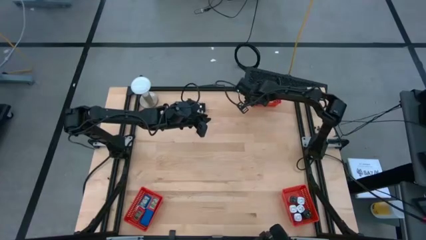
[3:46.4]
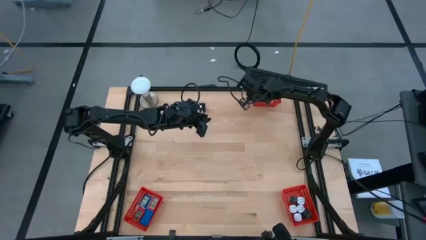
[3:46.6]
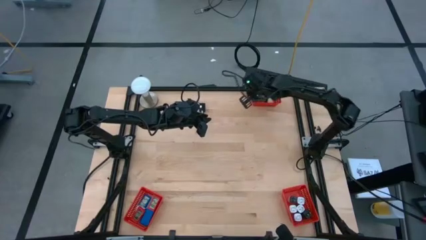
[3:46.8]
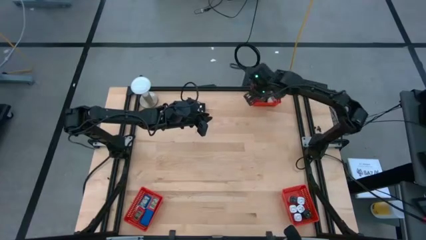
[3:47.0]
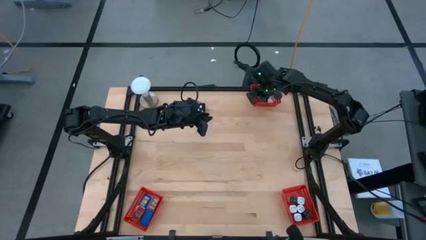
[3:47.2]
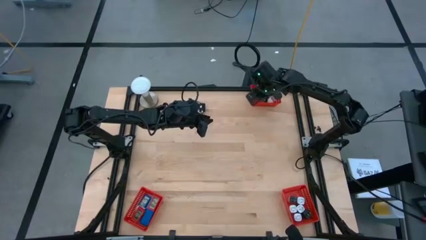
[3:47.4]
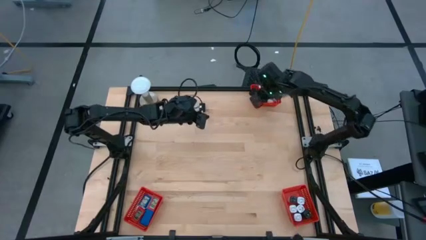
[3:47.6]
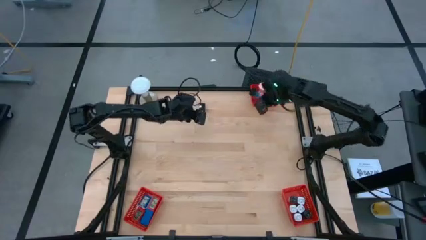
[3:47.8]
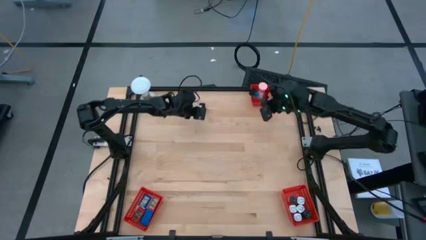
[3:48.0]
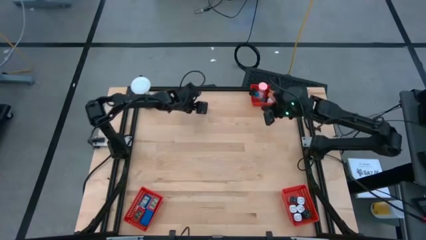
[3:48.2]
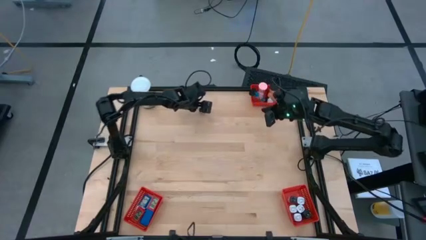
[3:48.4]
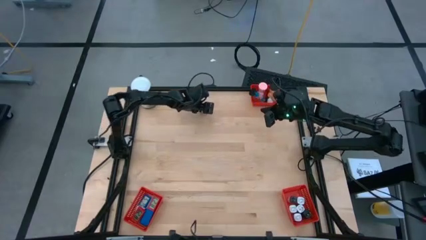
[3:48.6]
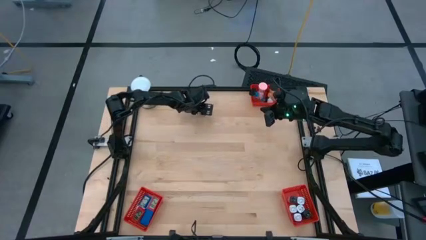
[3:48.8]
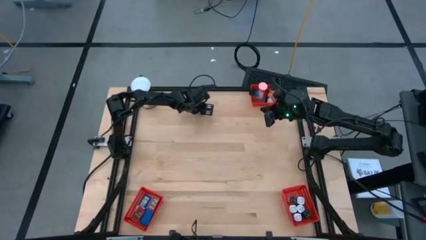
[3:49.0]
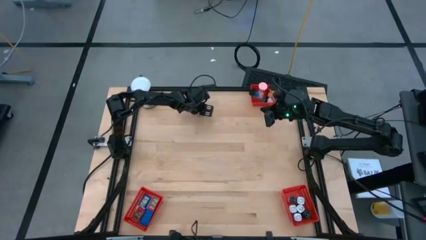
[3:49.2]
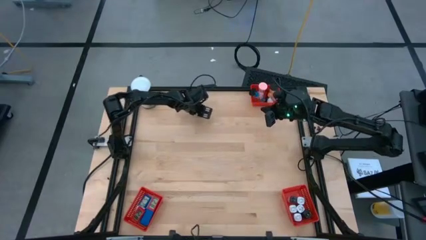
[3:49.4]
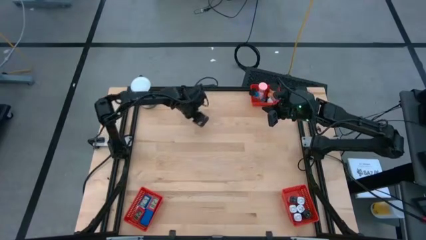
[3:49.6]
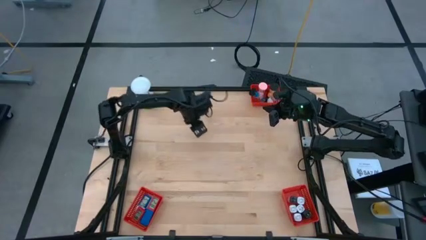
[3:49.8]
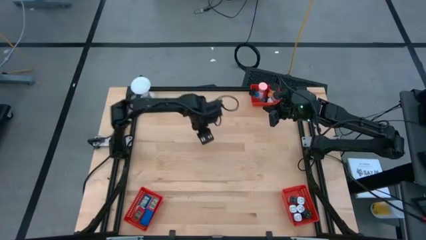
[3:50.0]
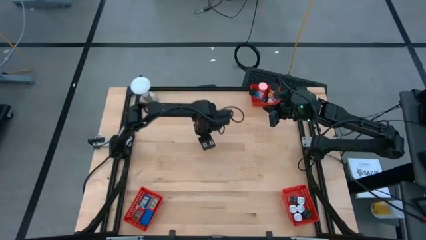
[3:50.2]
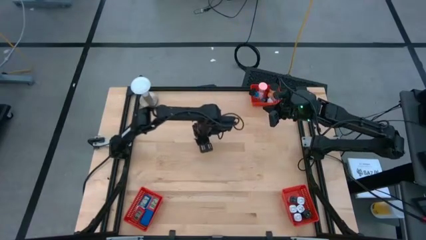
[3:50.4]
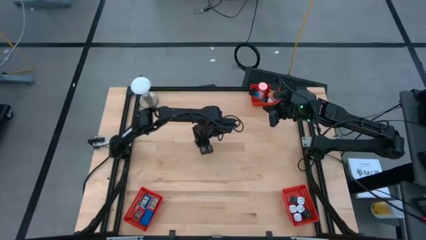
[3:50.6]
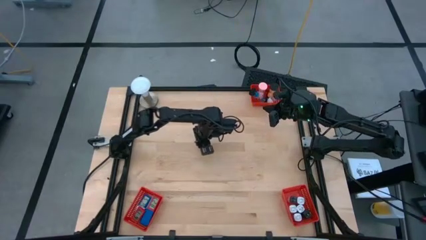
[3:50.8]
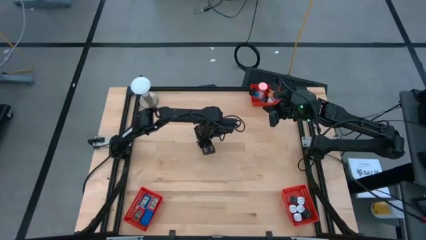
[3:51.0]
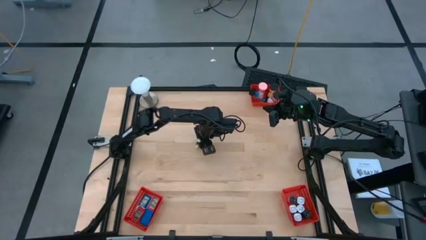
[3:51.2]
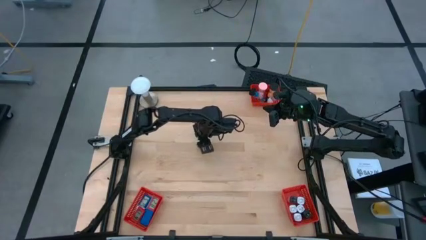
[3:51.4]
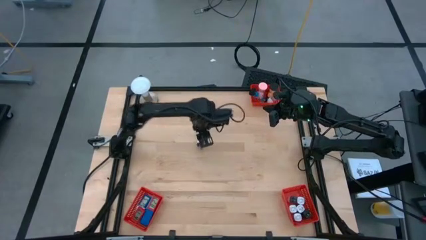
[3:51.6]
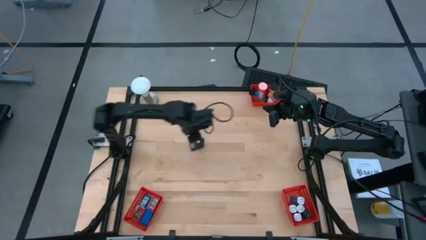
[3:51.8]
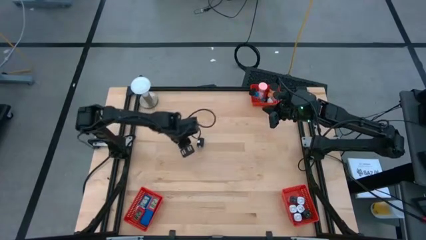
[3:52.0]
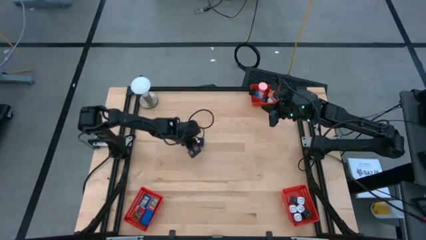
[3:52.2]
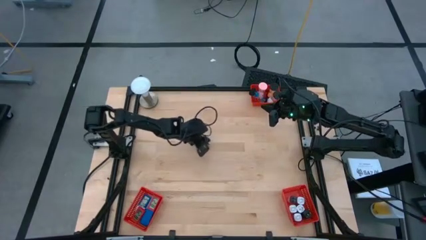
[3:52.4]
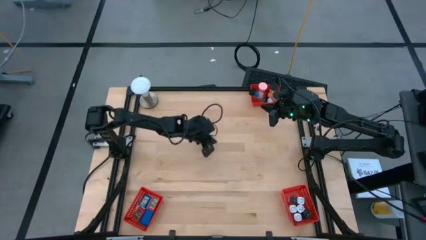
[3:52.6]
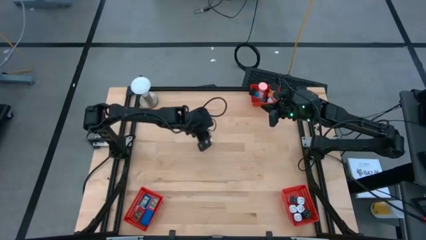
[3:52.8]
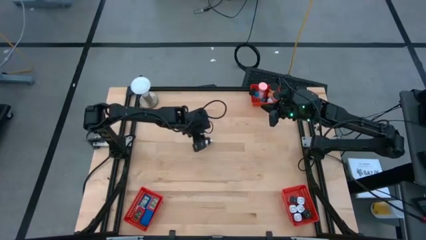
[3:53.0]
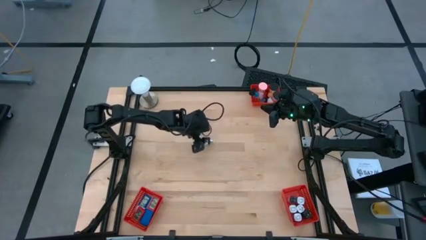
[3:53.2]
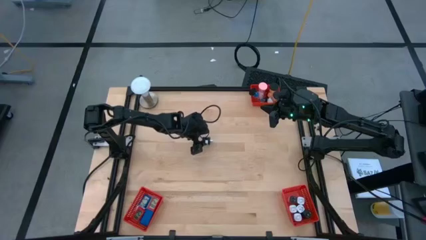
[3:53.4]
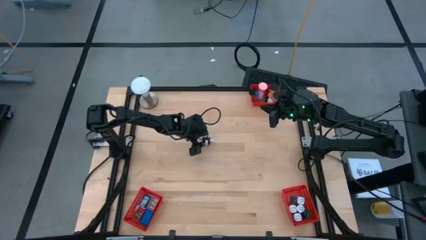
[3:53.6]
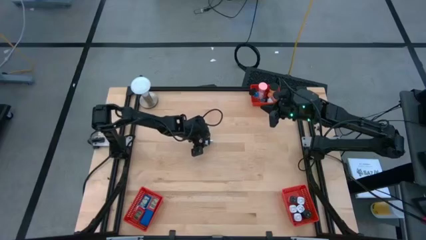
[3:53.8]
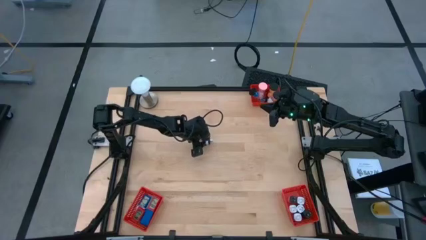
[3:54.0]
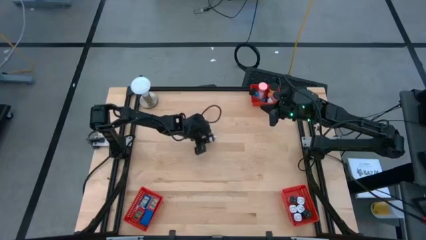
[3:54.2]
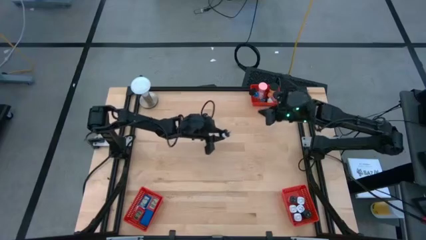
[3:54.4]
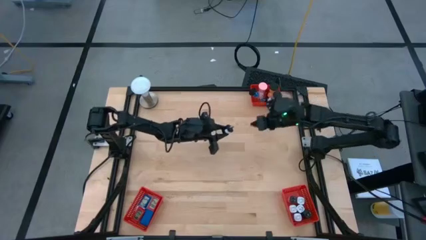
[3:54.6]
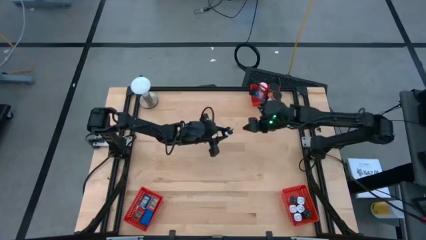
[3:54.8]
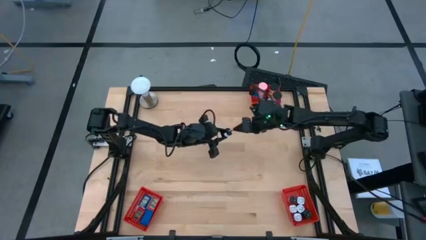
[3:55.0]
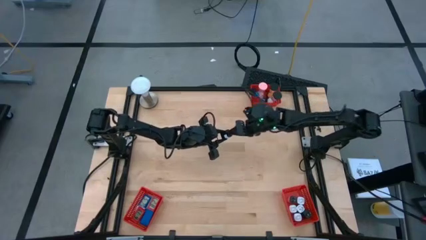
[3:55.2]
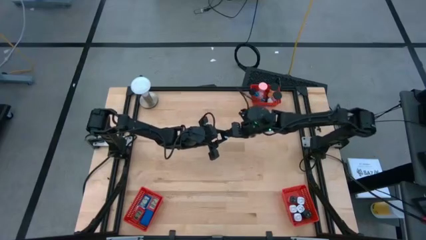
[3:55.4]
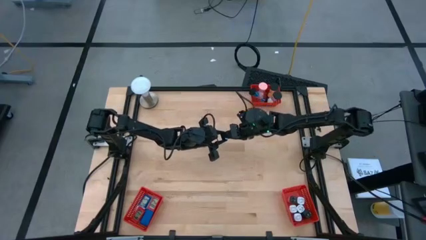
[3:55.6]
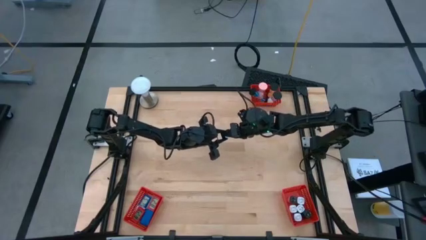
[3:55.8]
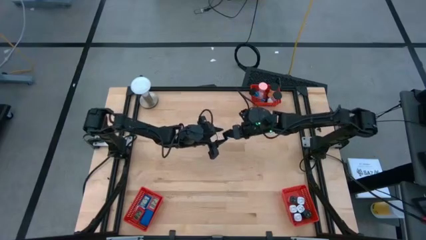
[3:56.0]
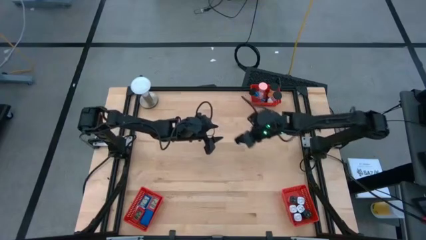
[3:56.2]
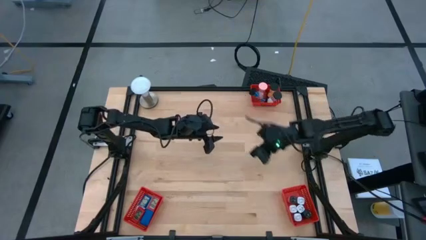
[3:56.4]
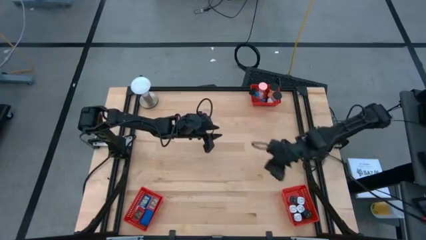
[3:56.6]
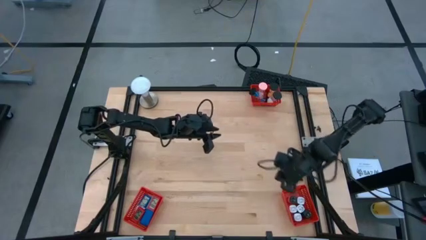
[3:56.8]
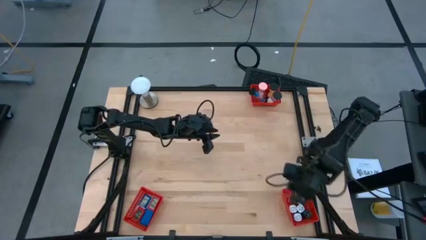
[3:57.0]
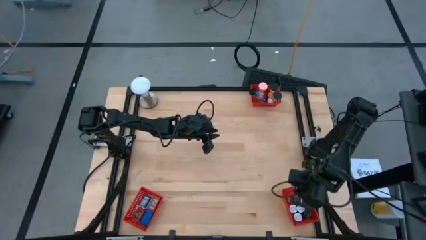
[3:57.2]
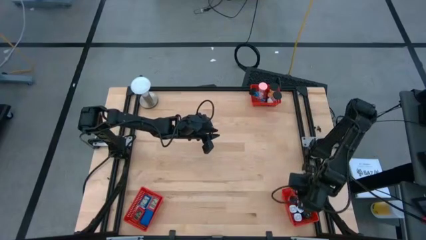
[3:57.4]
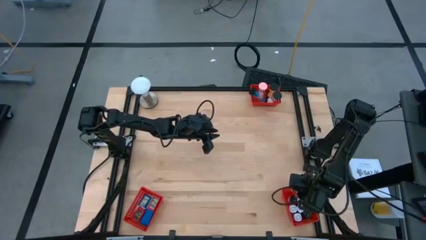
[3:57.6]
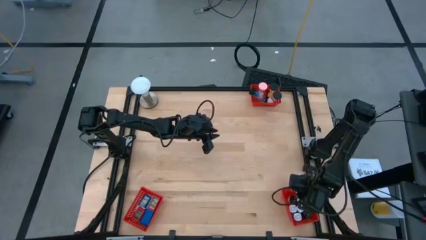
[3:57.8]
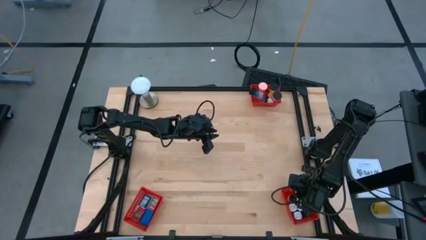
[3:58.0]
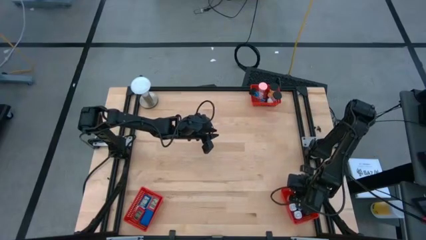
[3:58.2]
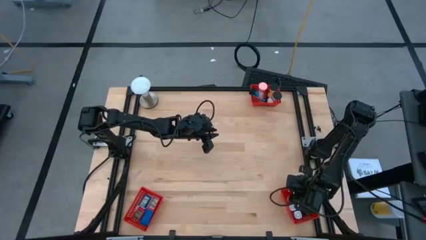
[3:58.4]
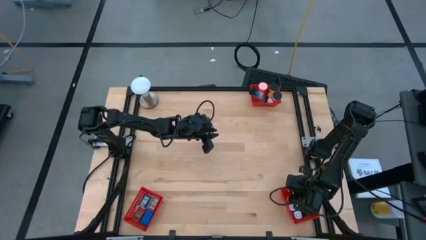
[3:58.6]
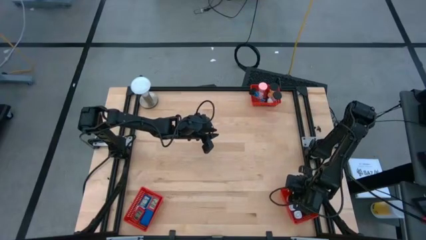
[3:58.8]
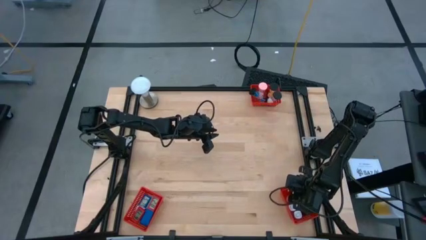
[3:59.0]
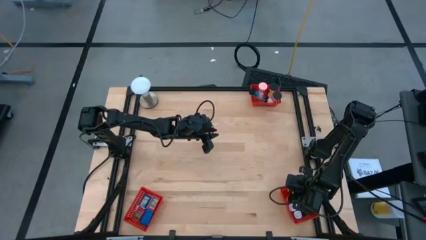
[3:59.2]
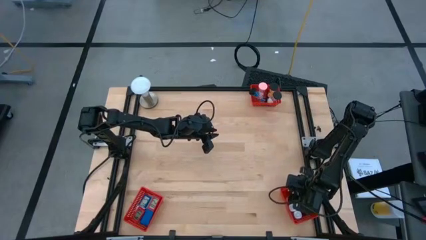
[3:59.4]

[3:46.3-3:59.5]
Task: Pick & Place Office items
Put the black charger adapter into the bottom right red basket

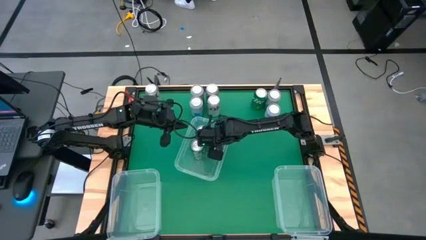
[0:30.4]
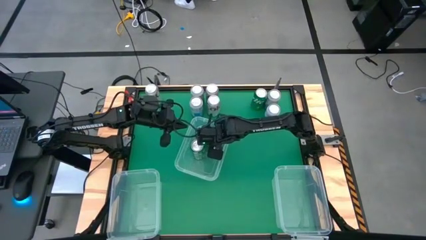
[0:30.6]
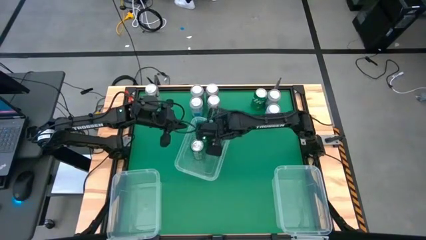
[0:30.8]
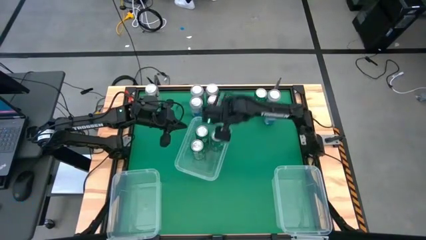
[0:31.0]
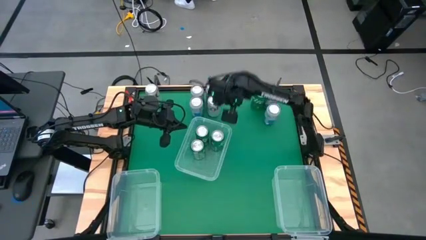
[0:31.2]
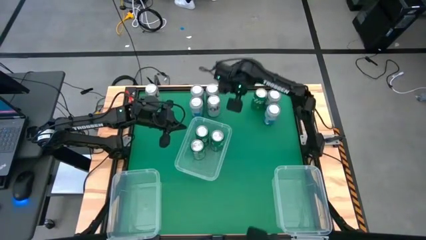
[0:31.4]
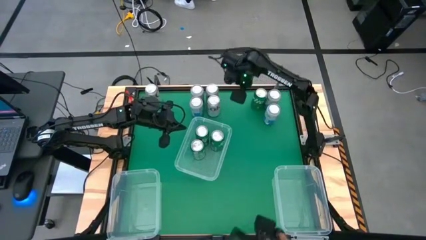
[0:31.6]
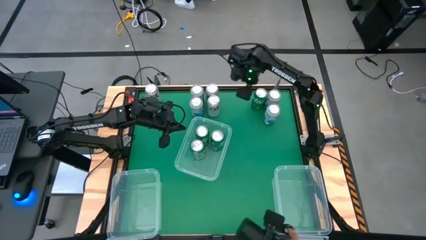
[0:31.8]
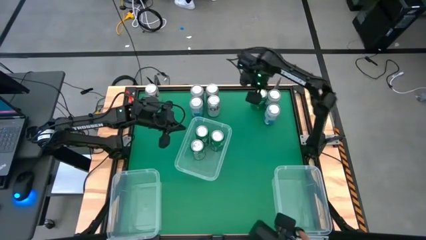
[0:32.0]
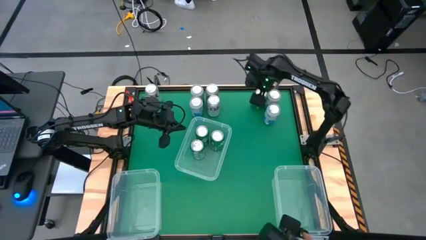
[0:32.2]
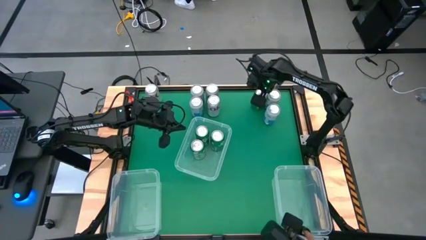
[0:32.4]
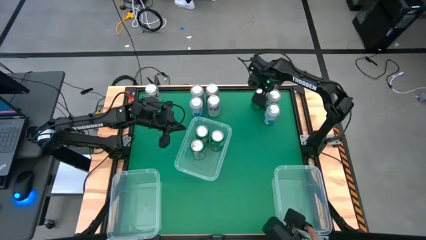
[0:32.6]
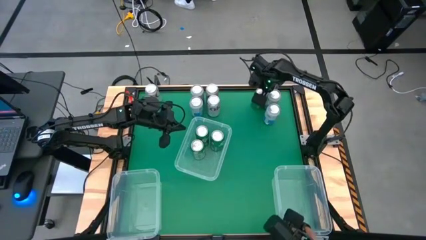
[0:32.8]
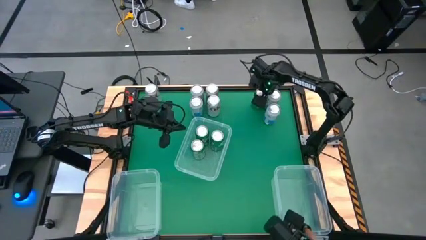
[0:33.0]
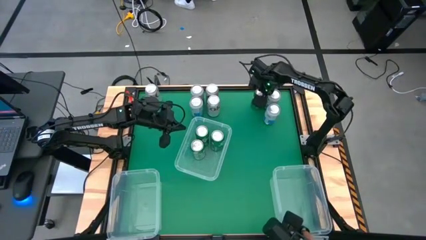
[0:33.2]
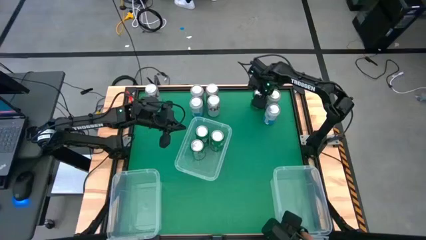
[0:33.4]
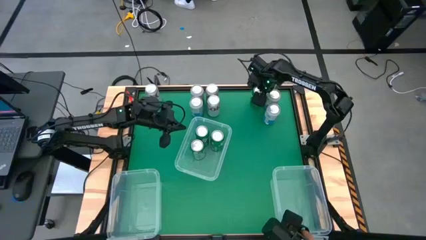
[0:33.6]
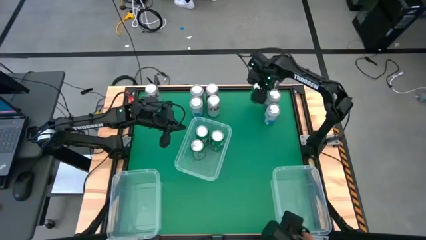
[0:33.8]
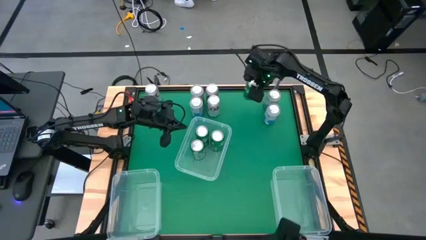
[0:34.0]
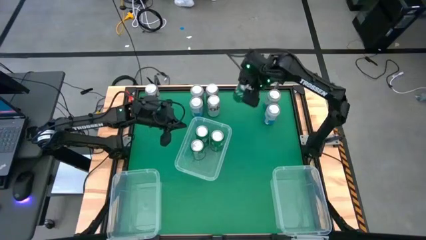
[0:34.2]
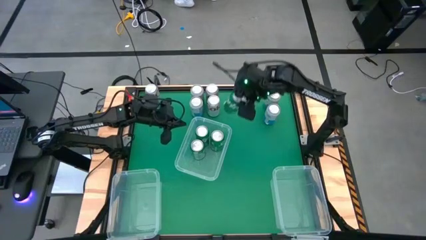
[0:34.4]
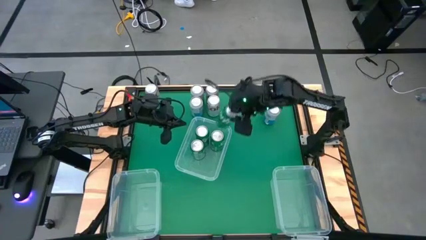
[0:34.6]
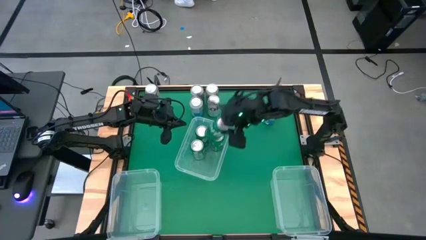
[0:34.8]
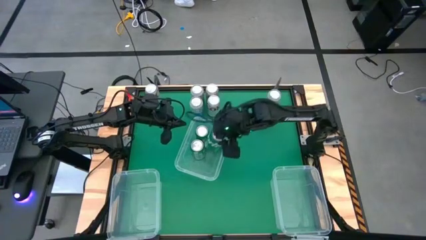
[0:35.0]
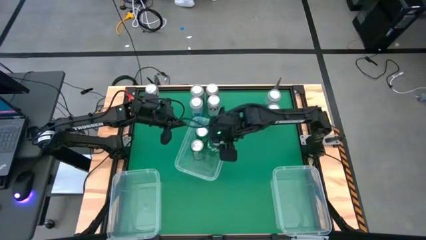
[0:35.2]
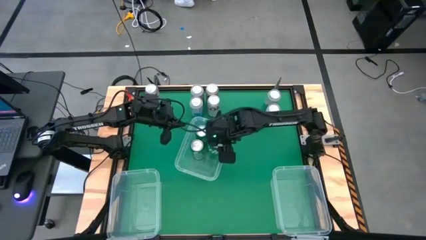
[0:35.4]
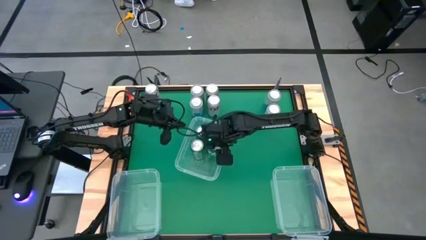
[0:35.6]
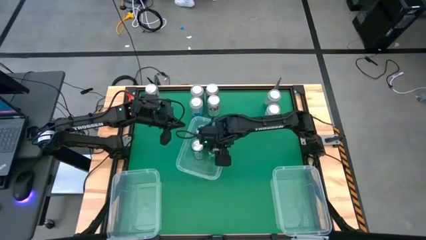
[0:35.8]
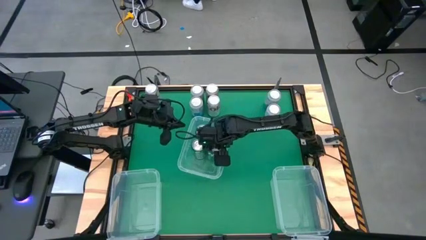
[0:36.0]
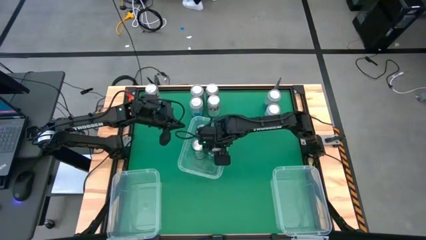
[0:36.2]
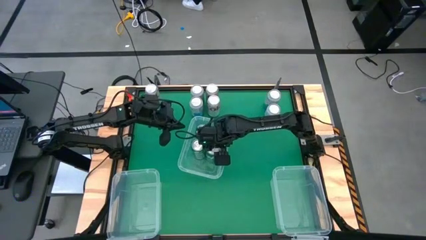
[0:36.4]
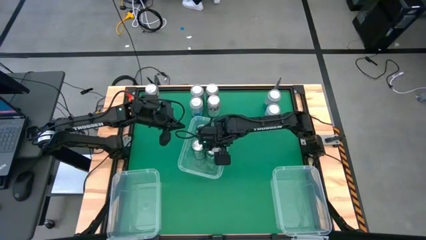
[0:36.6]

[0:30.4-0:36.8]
Task: Sort soda cans
Put the green soda can into the top bin
